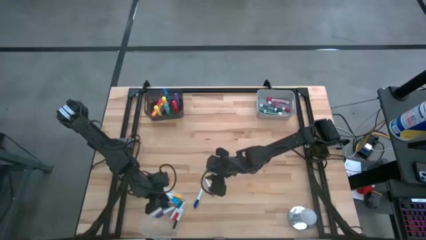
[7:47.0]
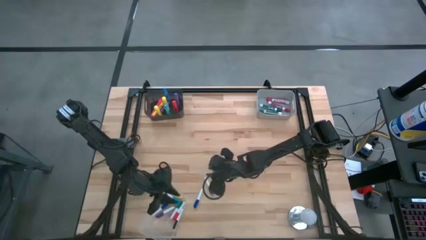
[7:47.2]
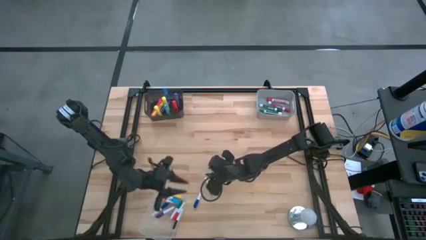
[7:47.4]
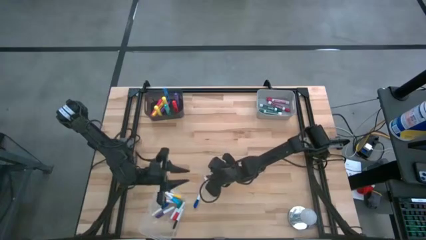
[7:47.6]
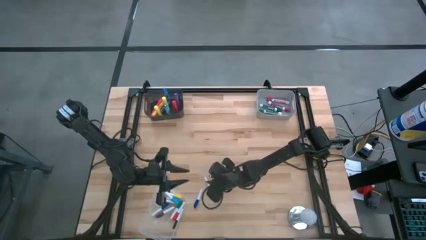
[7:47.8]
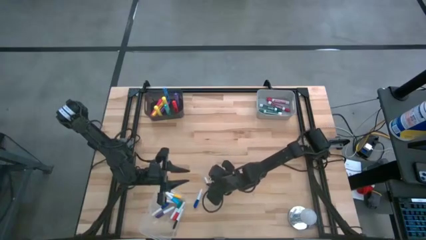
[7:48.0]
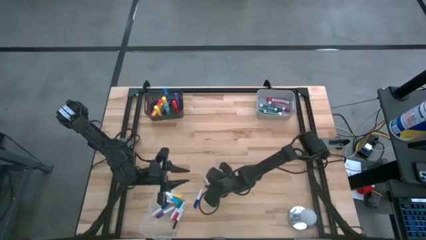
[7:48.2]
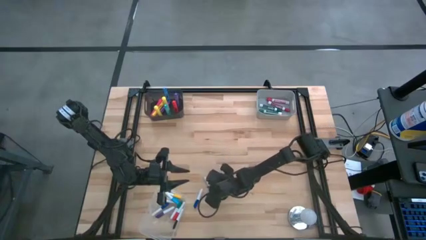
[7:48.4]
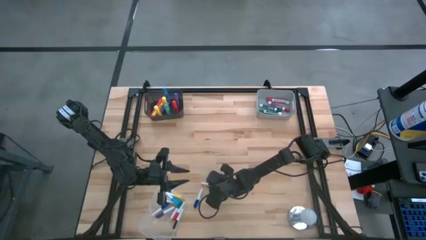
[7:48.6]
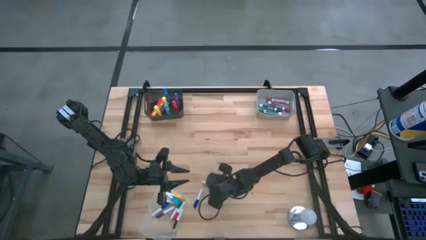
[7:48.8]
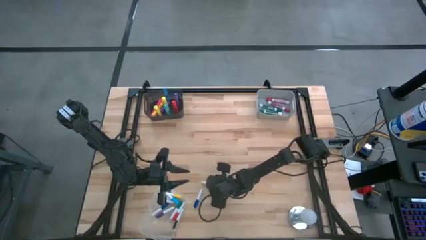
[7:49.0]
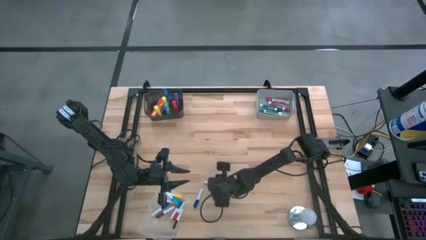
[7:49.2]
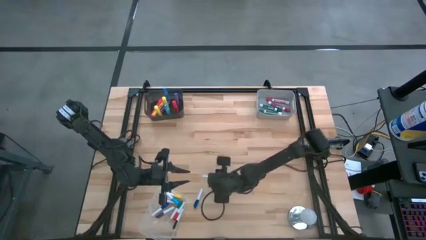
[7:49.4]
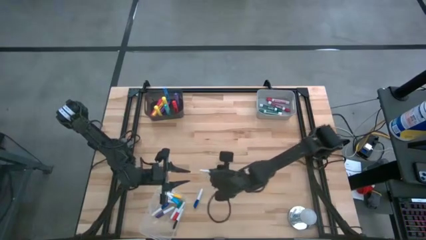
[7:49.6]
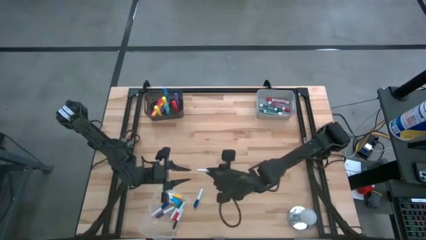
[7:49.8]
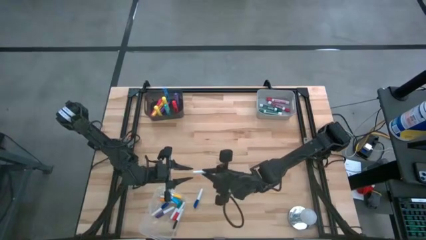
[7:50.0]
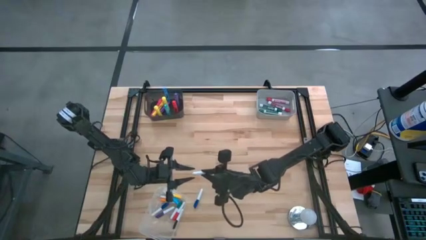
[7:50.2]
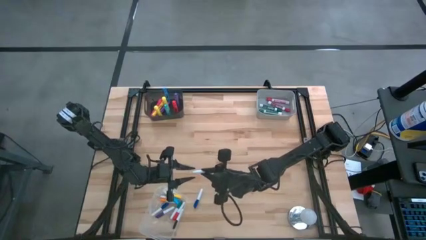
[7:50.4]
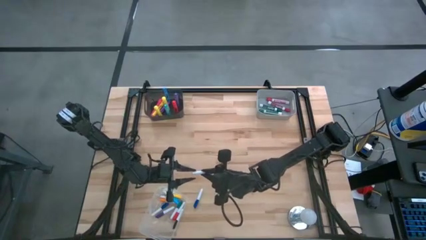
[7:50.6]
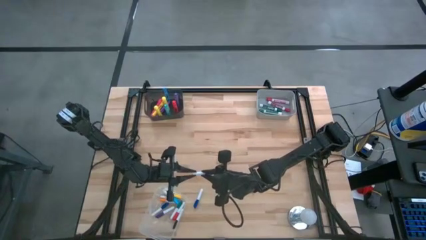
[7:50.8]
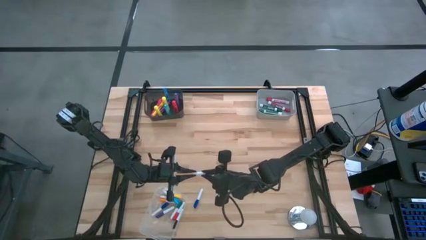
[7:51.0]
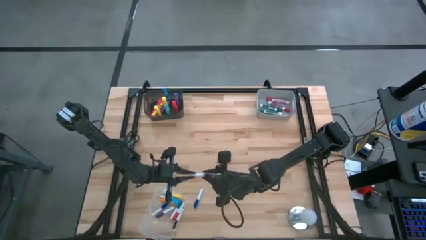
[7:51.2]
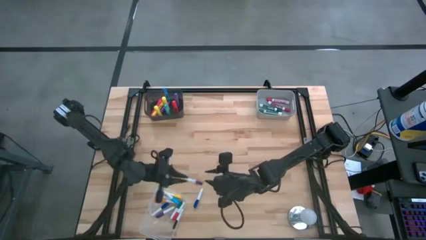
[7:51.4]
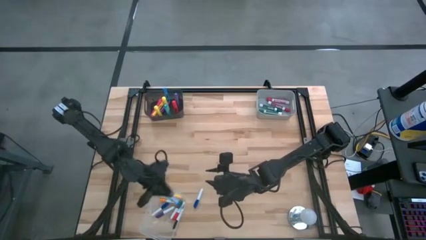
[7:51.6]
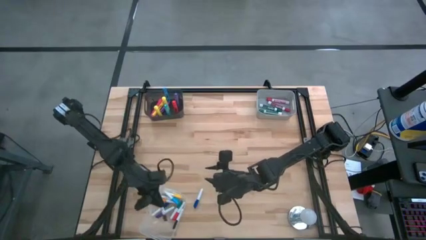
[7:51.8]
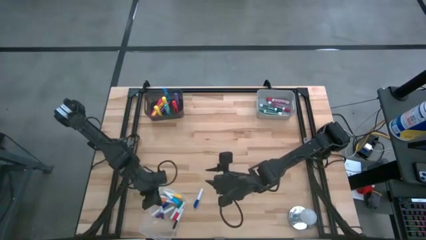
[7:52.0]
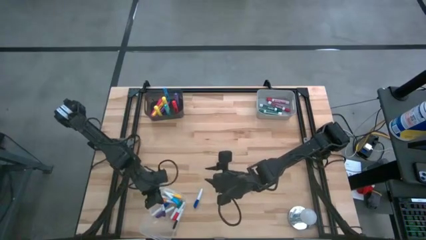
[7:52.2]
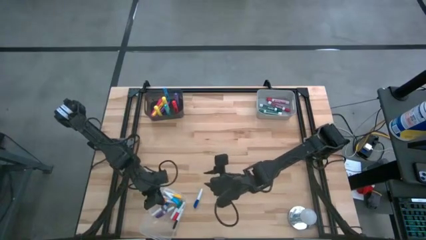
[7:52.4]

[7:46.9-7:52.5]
Task: Pick & Place Markers
Put the blue and white highlighter pen into the transparent bin

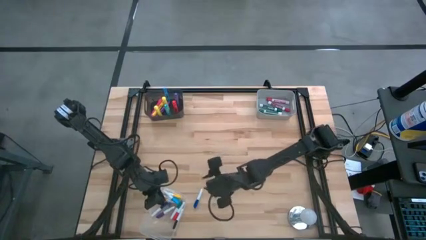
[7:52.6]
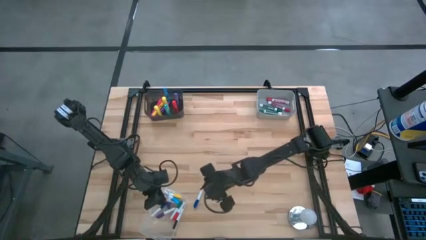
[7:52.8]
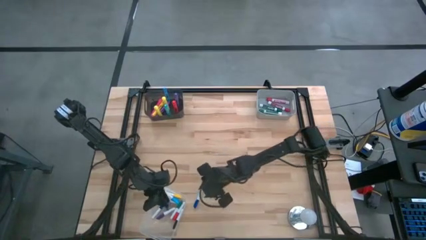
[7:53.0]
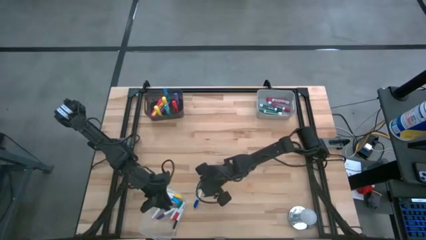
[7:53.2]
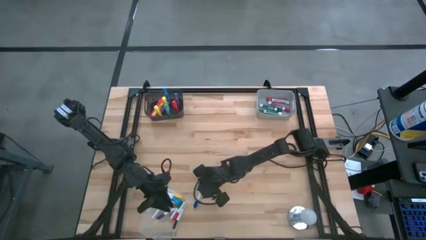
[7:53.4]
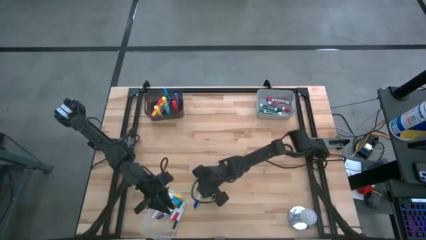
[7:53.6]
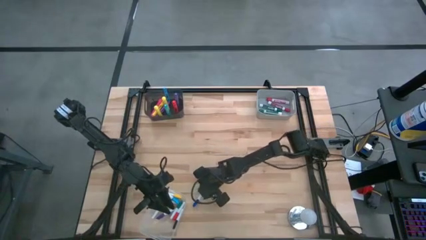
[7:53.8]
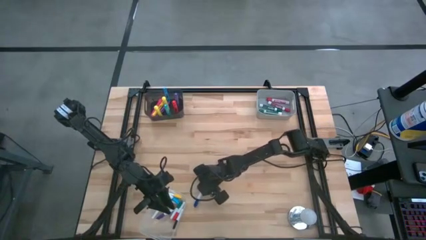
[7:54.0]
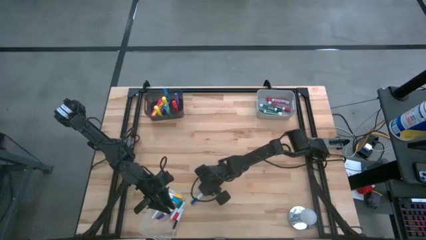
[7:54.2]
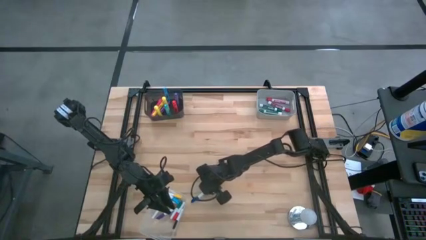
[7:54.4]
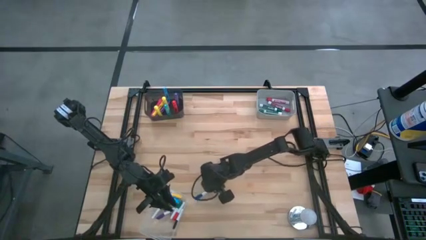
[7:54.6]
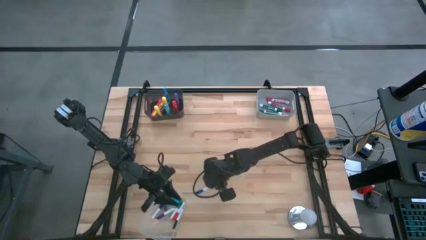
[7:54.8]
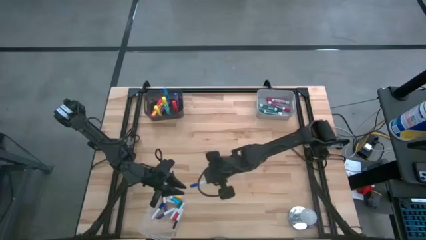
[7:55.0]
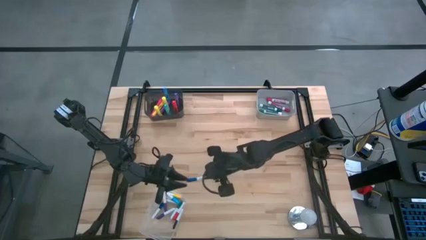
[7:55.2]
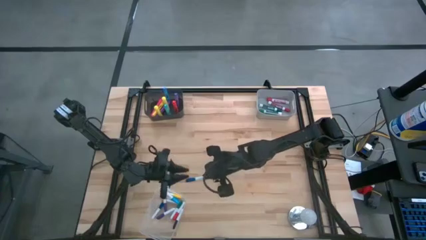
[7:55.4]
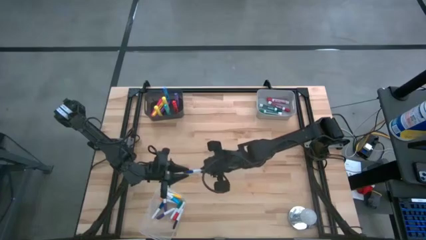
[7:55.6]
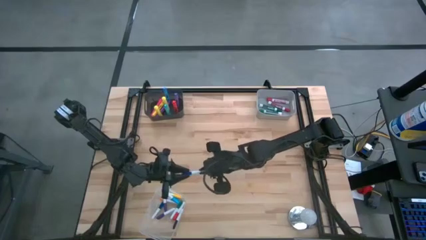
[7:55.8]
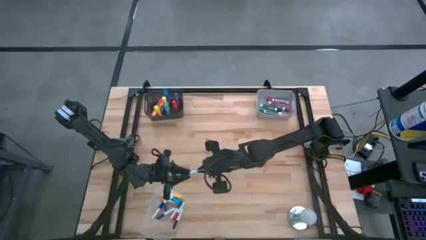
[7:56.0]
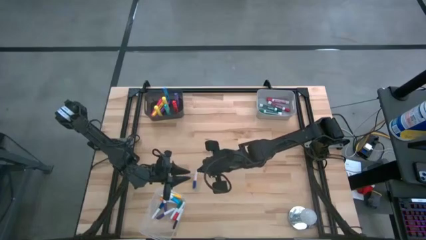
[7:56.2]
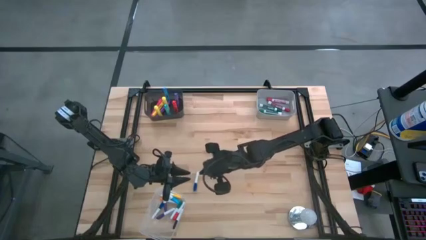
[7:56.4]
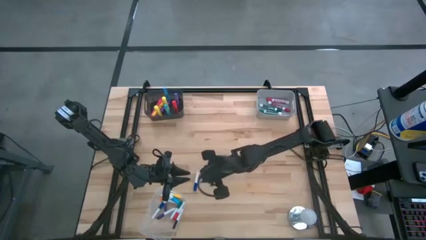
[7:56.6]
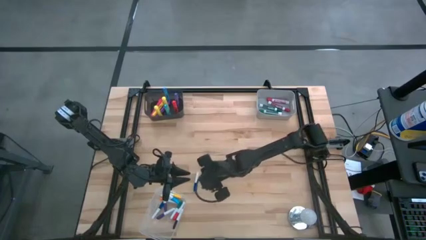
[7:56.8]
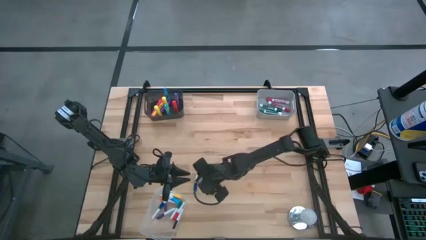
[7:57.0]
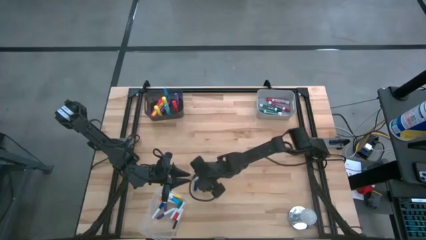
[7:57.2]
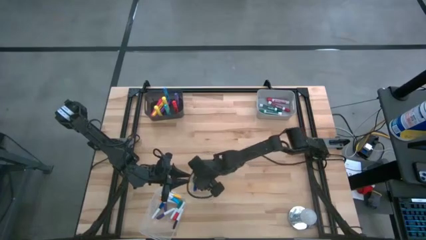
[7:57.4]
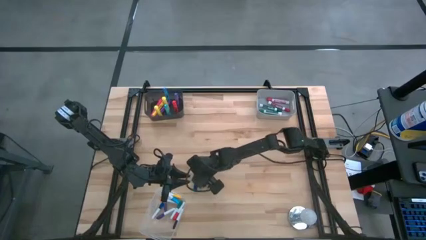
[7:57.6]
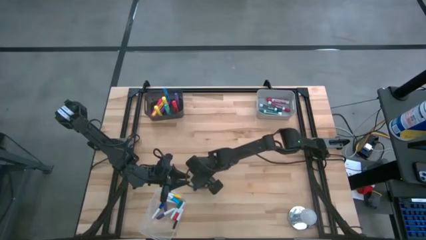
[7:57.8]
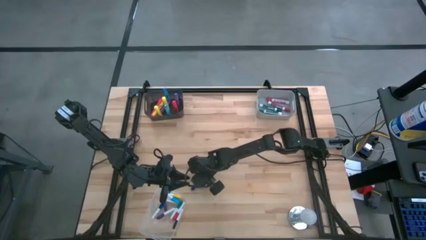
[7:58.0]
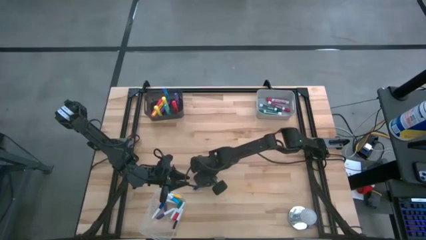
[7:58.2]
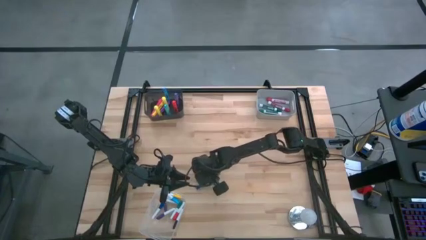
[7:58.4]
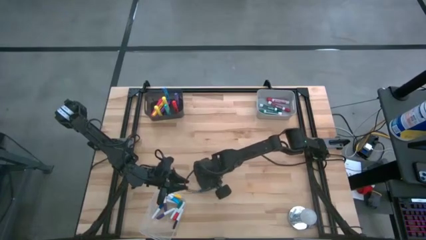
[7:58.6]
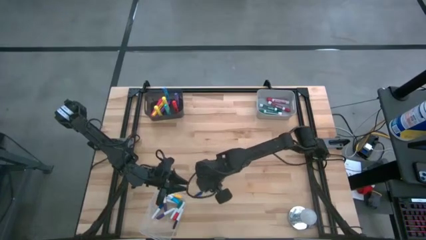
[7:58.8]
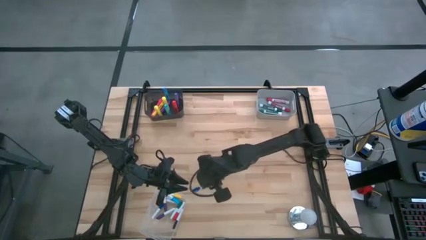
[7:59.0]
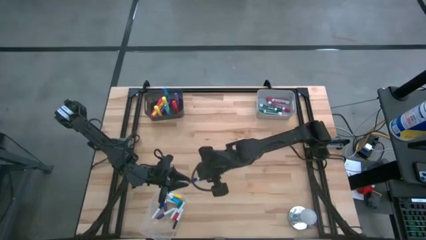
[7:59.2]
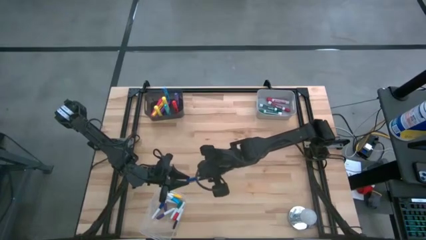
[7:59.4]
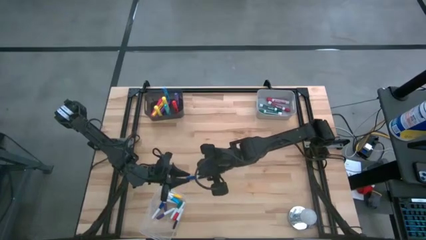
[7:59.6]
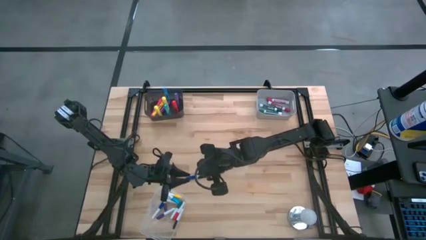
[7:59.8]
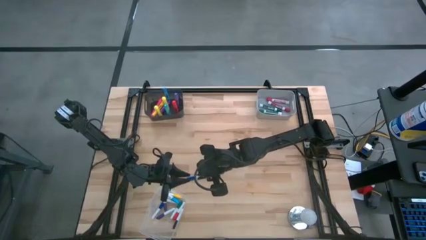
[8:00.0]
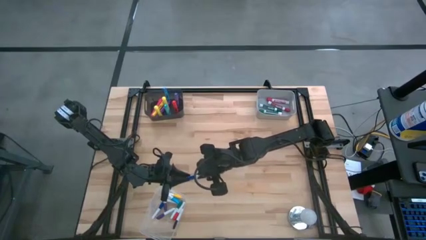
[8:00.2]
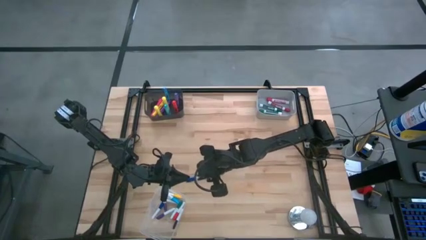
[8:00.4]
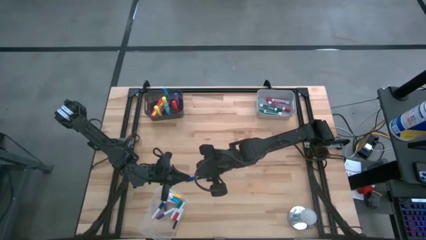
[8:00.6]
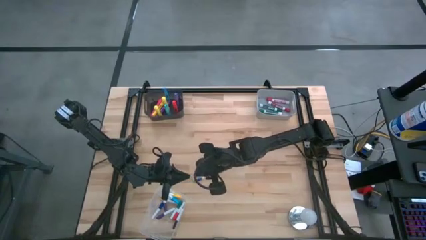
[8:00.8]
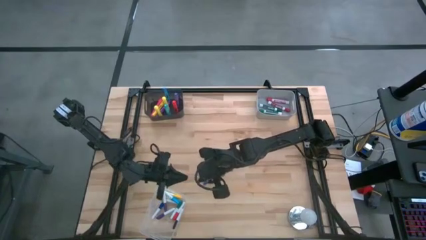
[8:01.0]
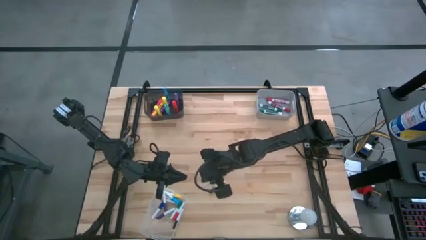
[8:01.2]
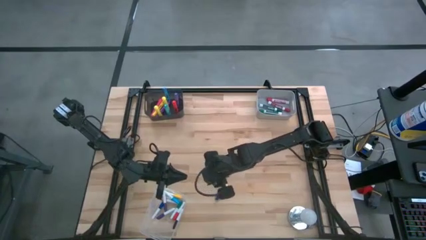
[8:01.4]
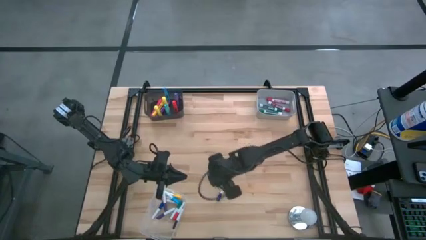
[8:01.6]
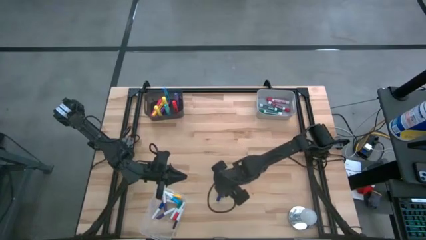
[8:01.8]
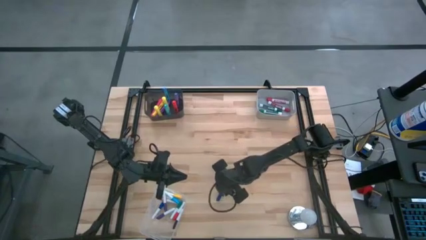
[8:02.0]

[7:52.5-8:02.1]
Put the blue and white highlighter pen into the transparent bin
